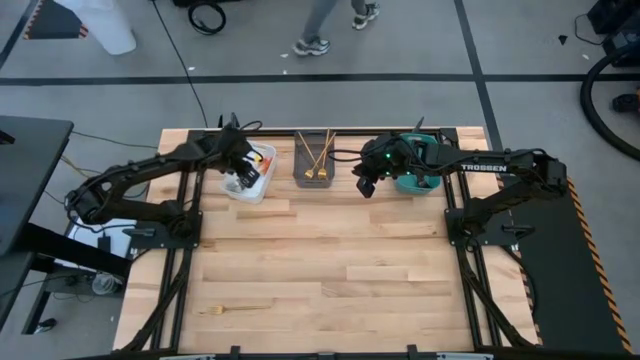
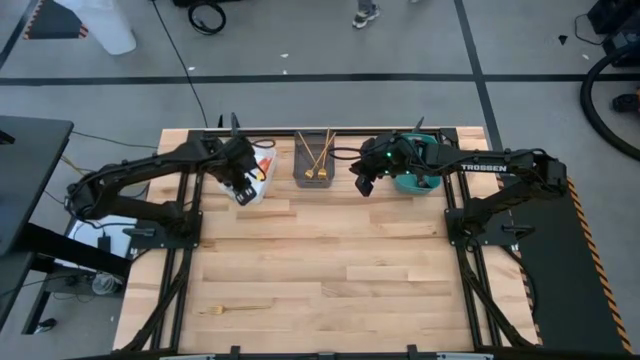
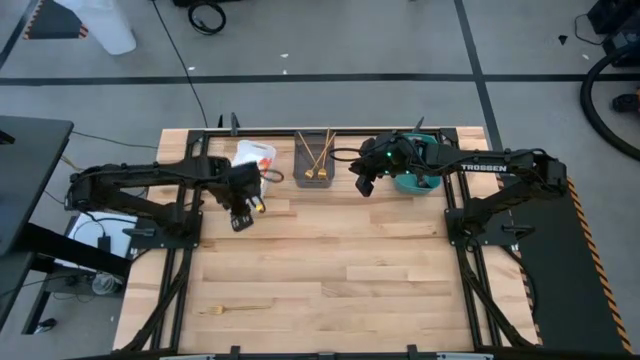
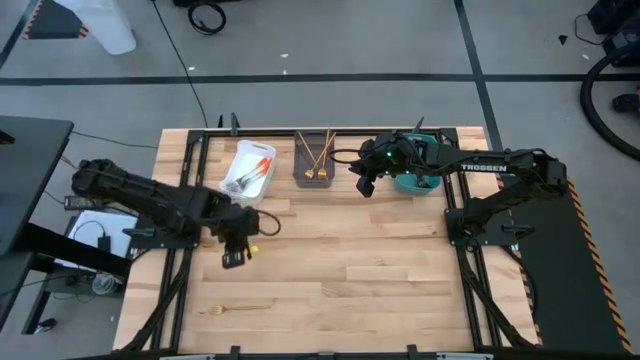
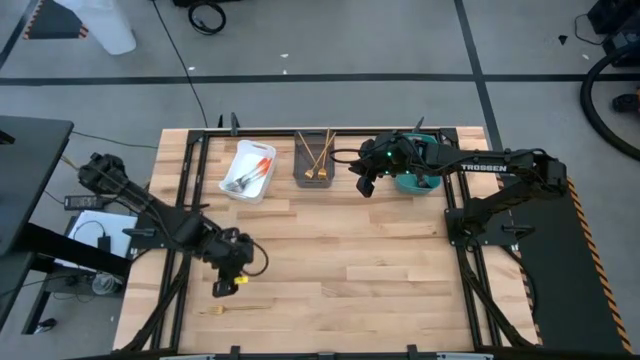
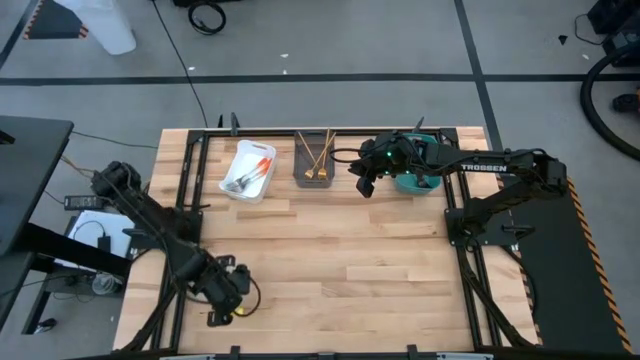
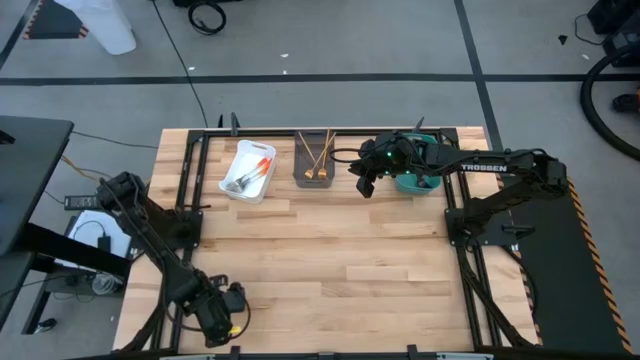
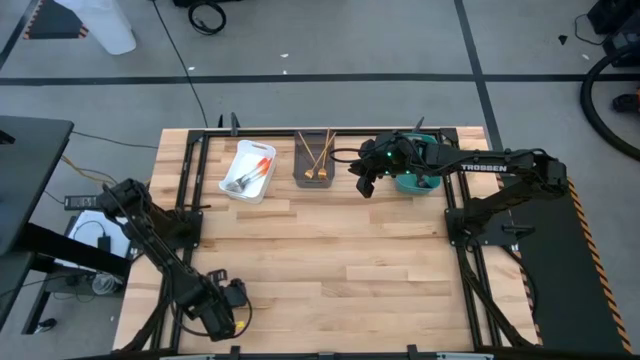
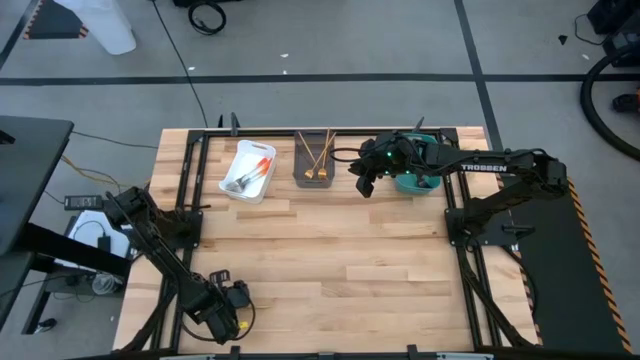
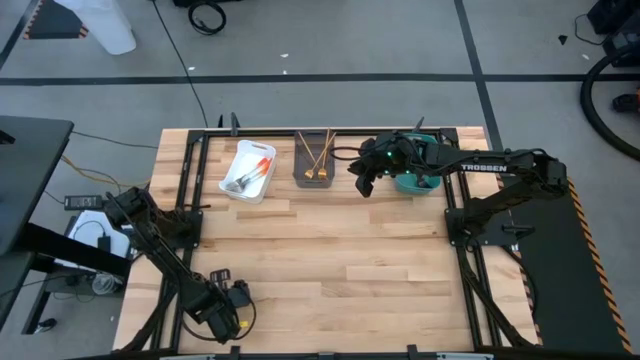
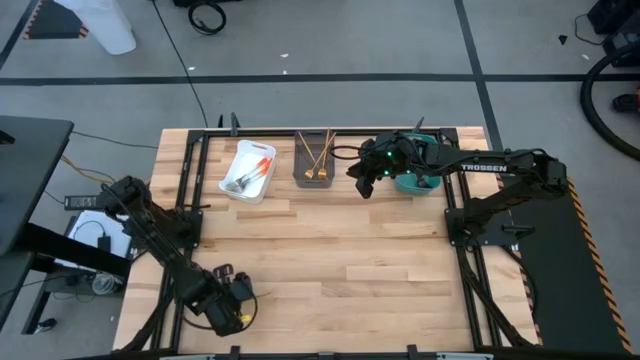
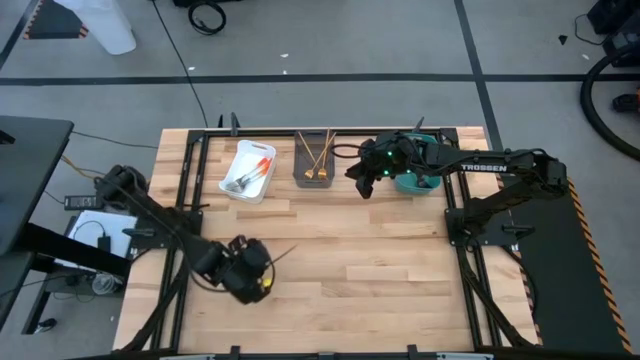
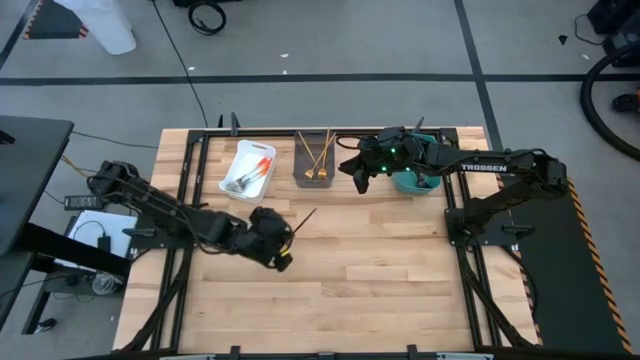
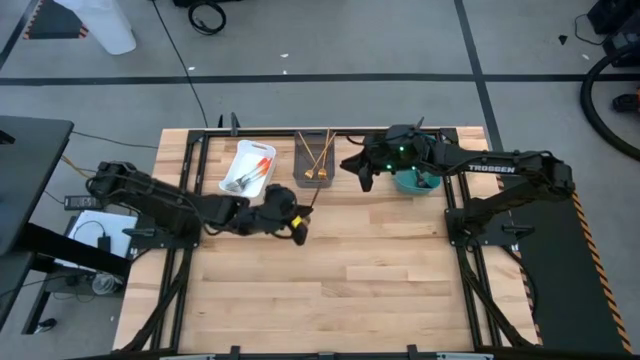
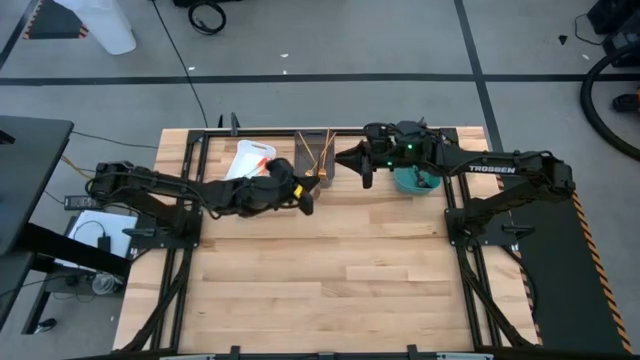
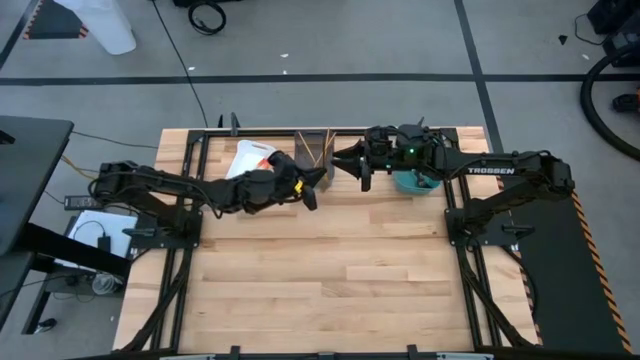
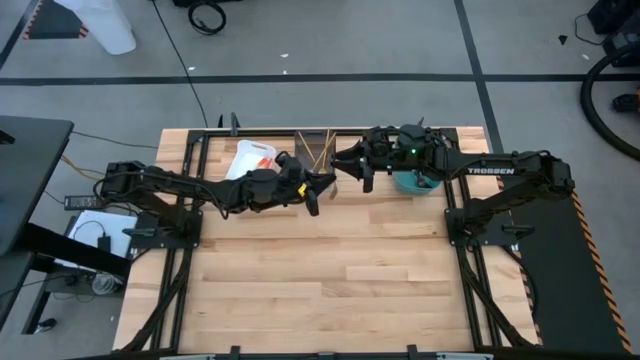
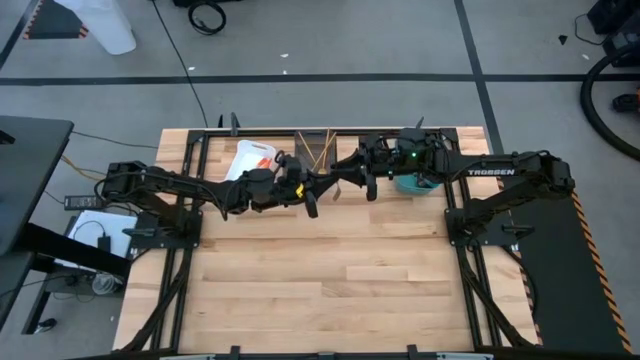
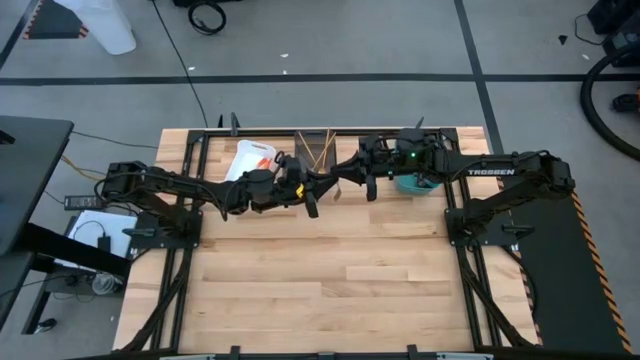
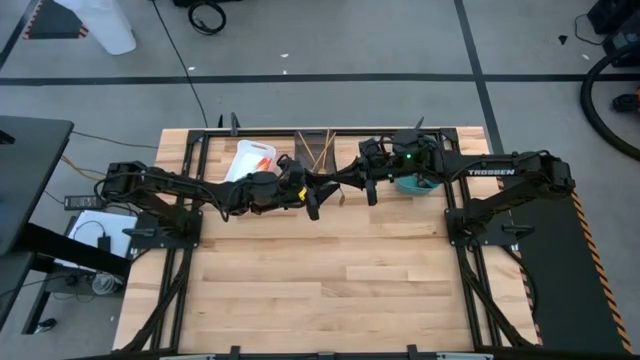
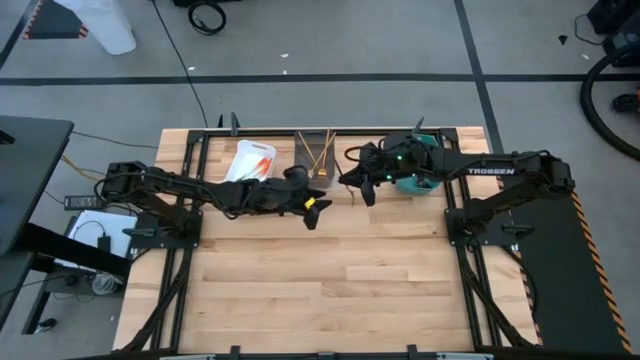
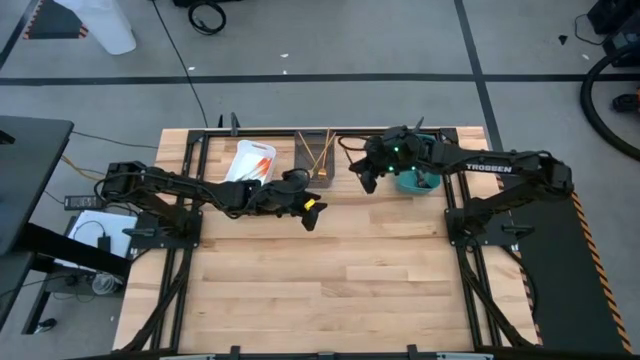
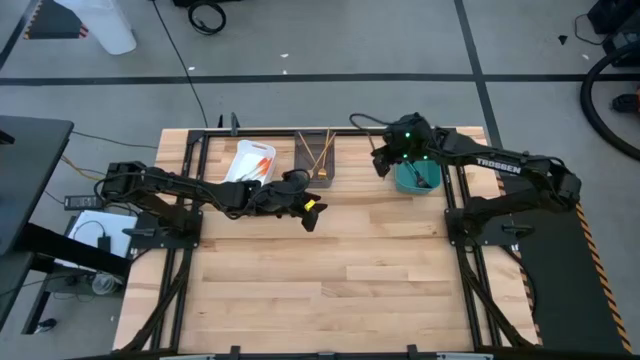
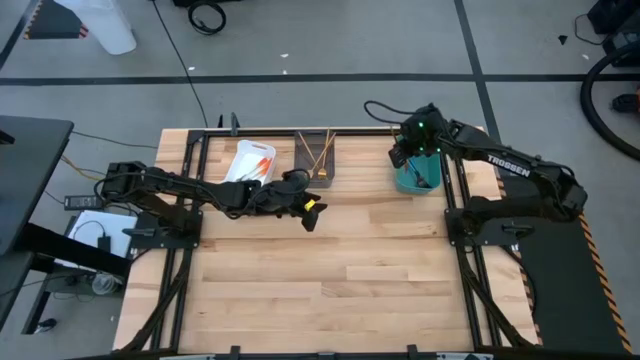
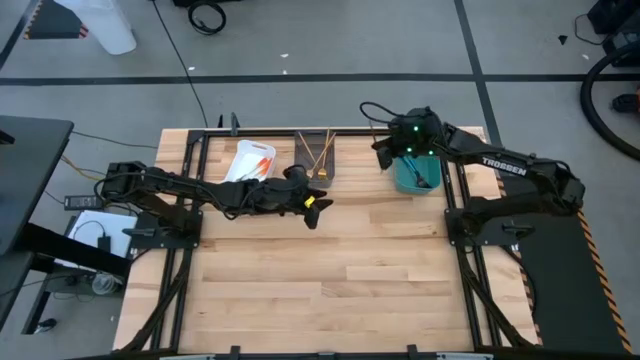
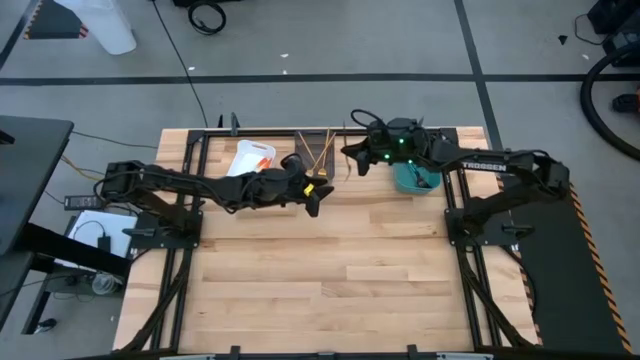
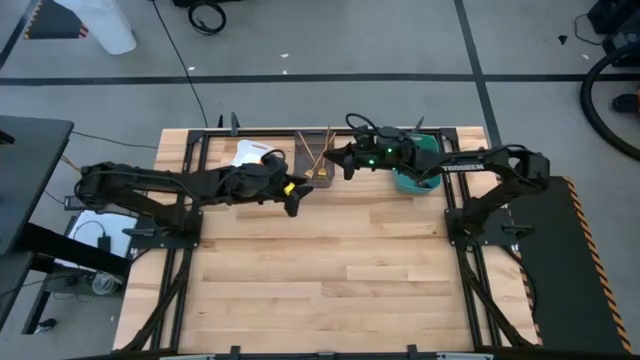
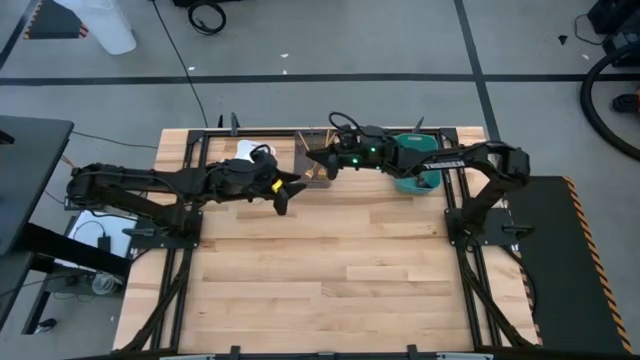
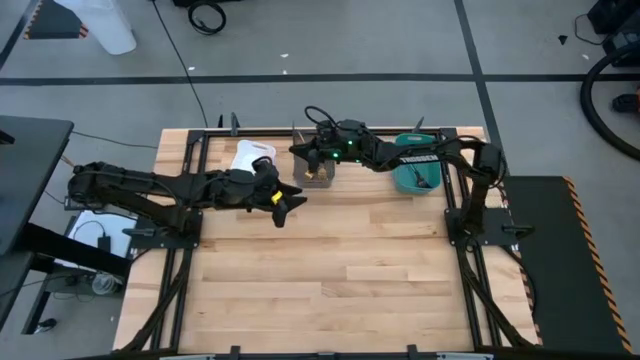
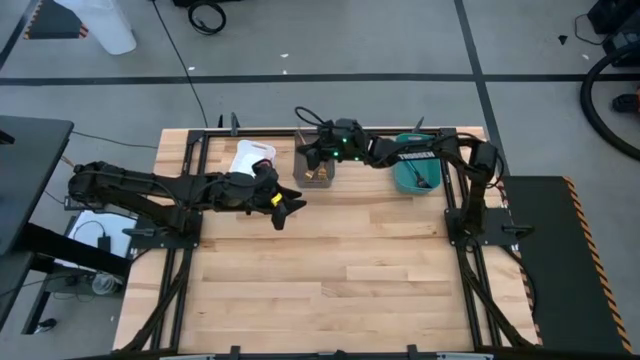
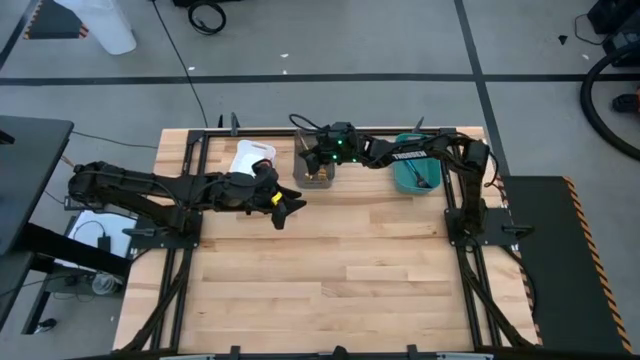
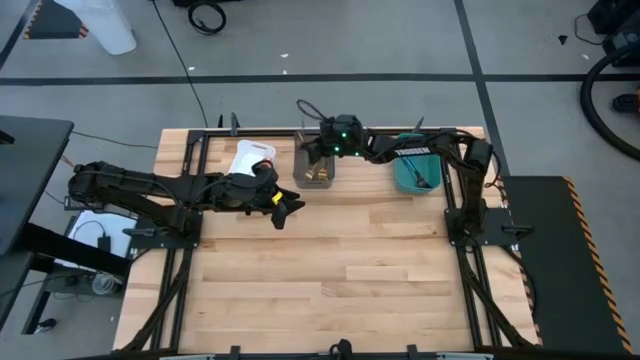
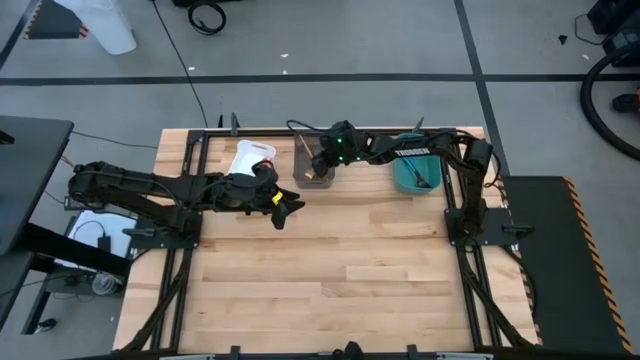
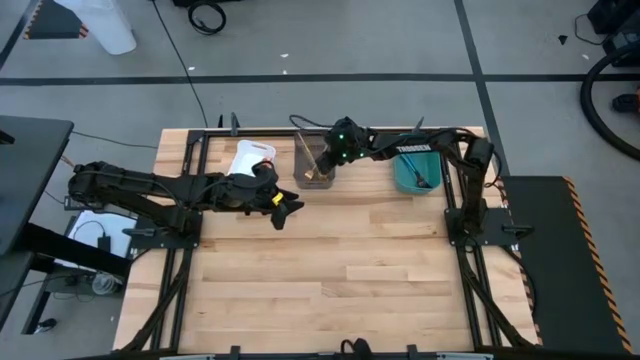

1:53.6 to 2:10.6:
Task: Sort silverware by color (type)
Put the yellow fork into the black bin

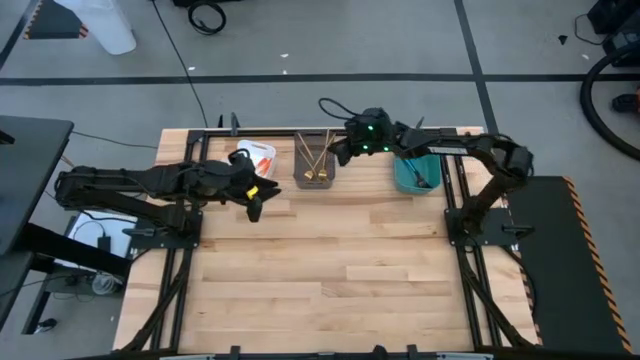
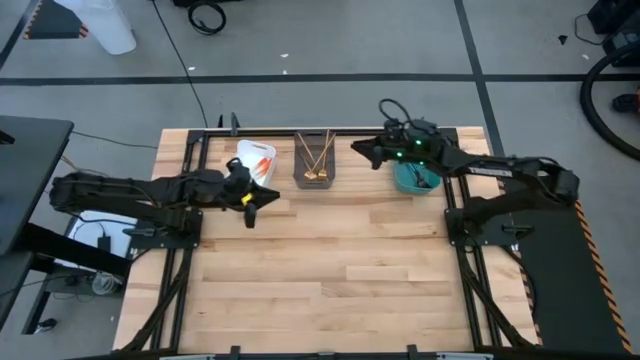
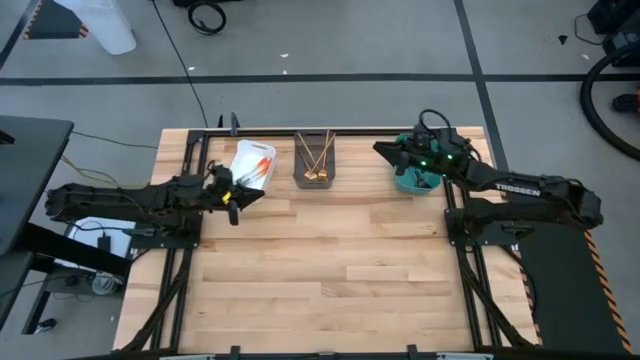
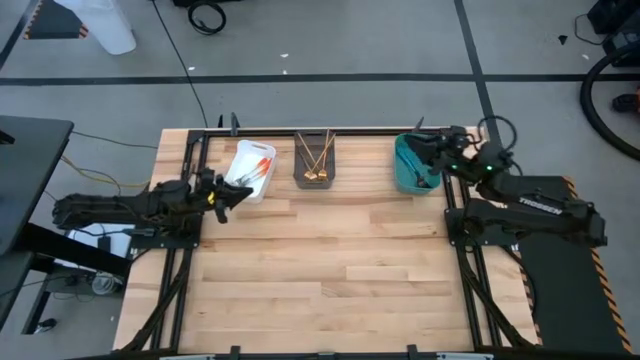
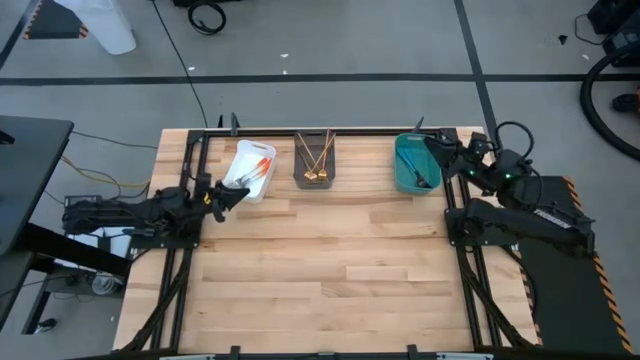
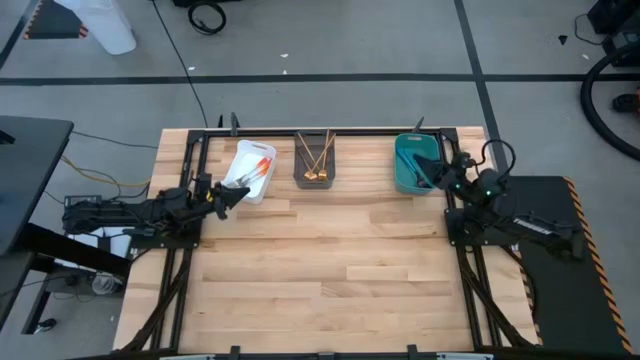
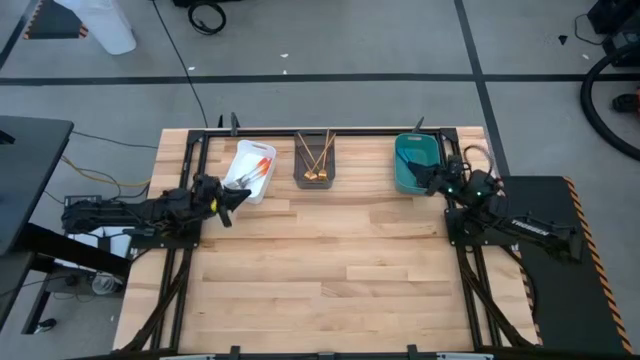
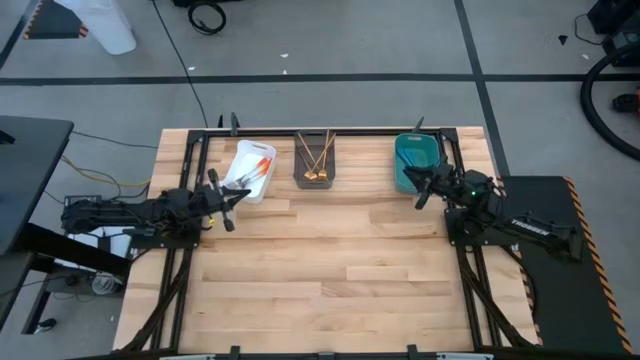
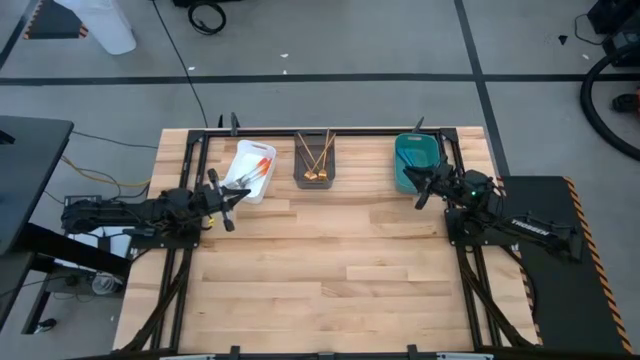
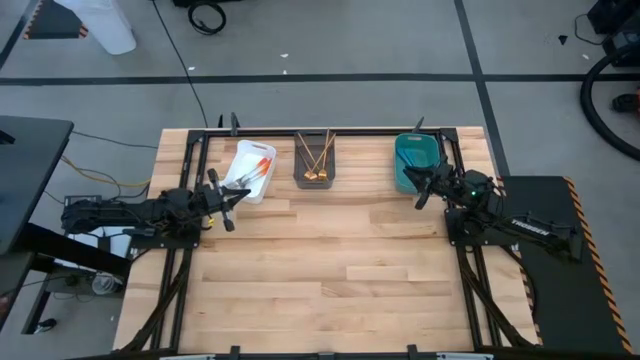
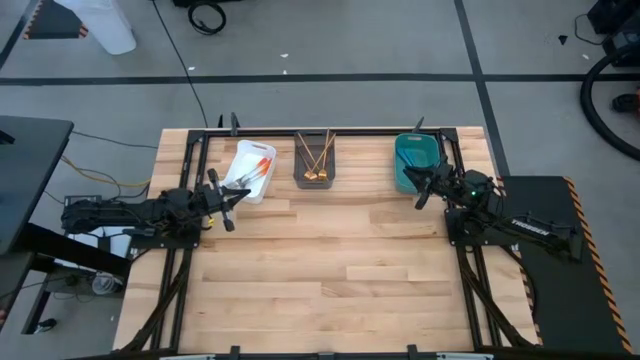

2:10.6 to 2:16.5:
Return to Home Position
